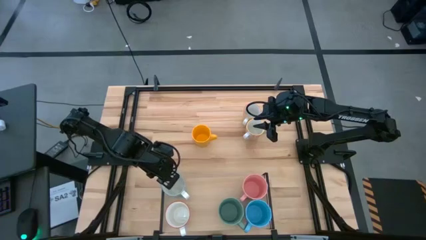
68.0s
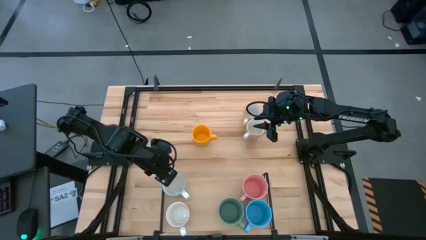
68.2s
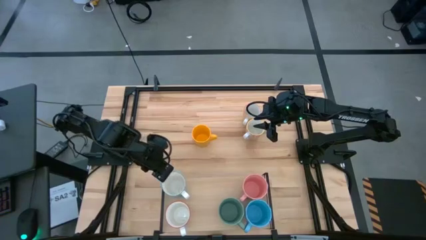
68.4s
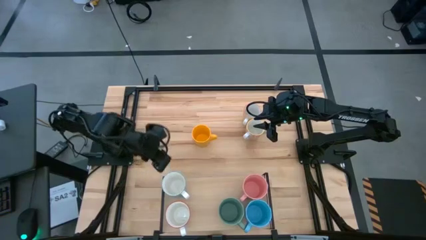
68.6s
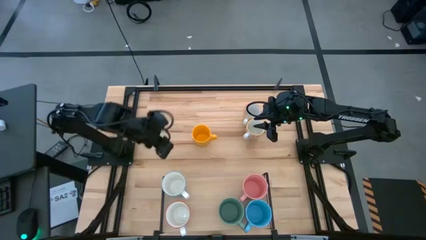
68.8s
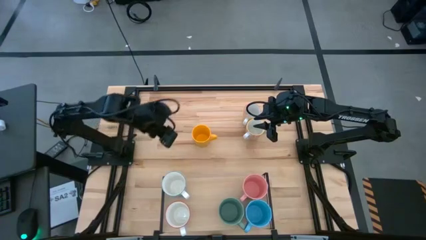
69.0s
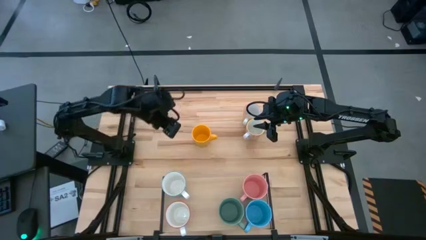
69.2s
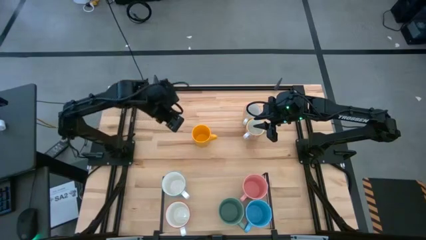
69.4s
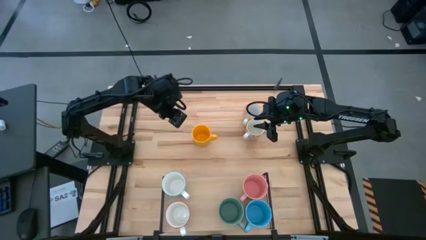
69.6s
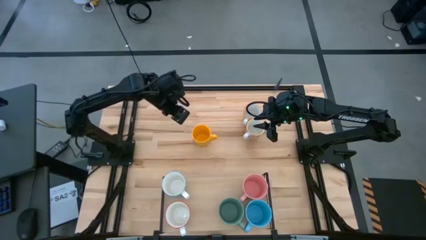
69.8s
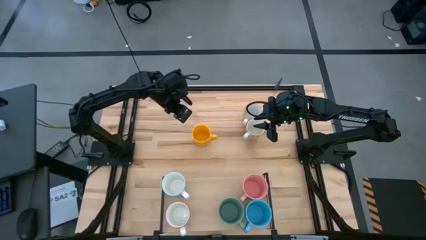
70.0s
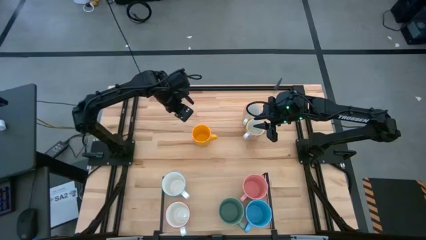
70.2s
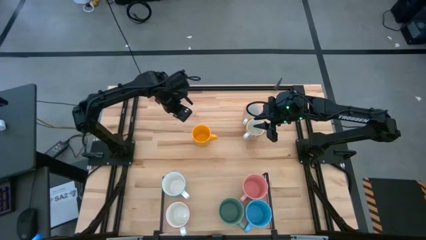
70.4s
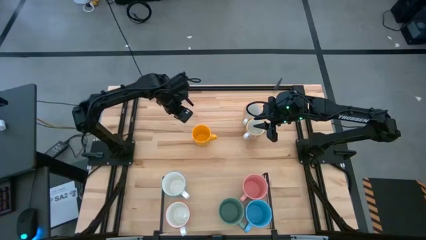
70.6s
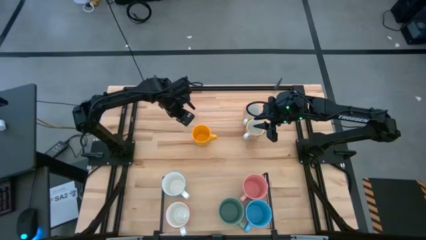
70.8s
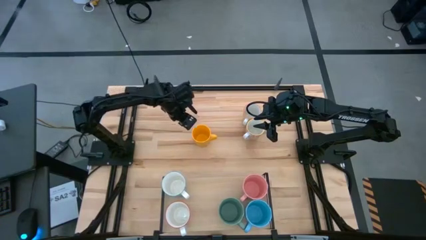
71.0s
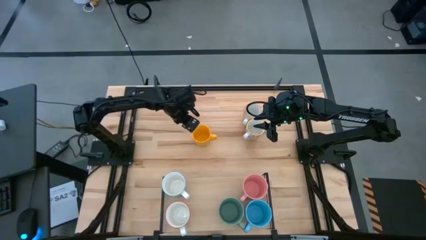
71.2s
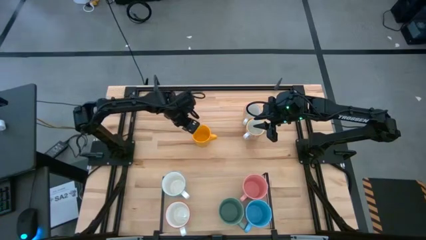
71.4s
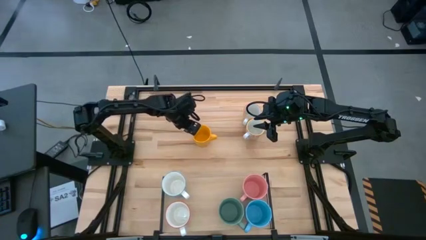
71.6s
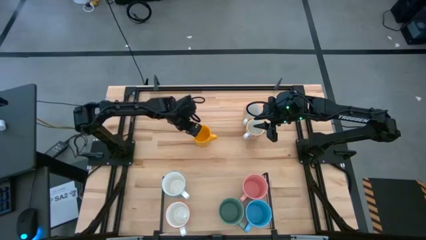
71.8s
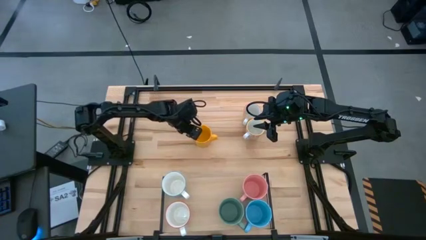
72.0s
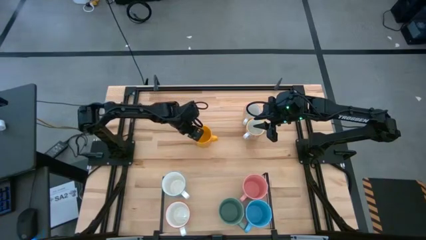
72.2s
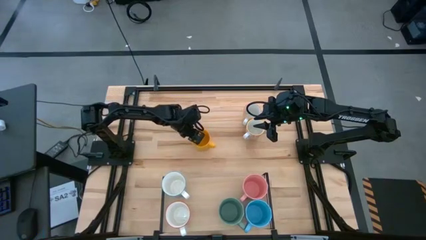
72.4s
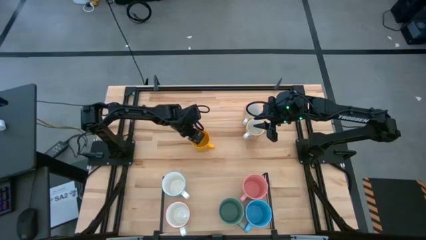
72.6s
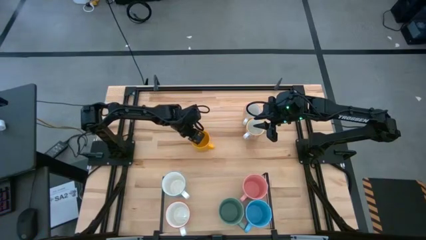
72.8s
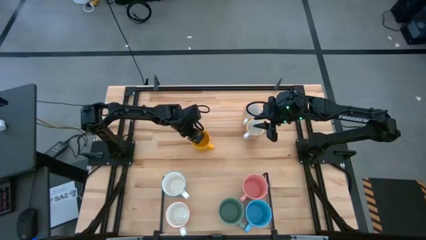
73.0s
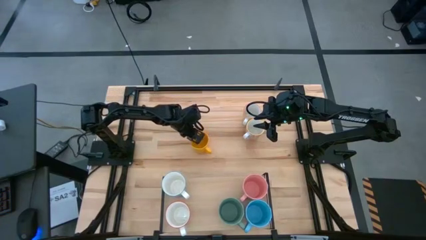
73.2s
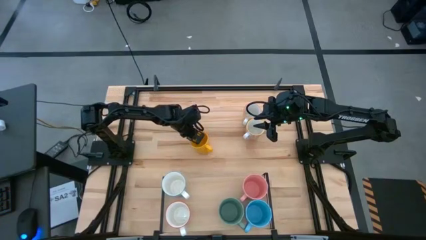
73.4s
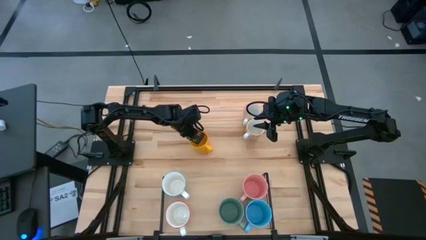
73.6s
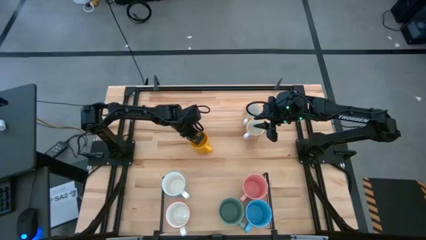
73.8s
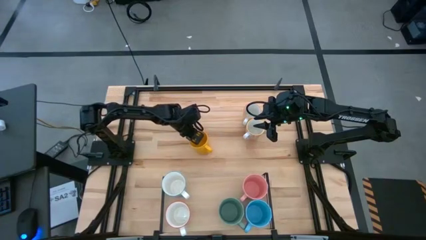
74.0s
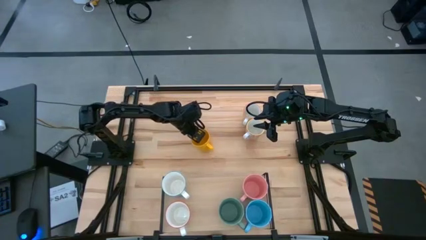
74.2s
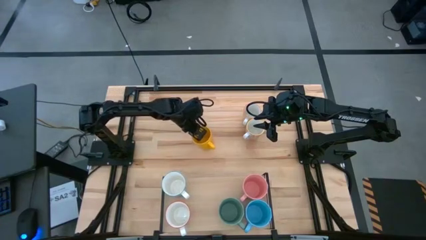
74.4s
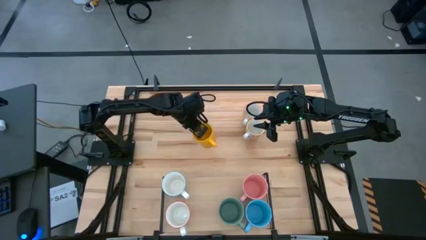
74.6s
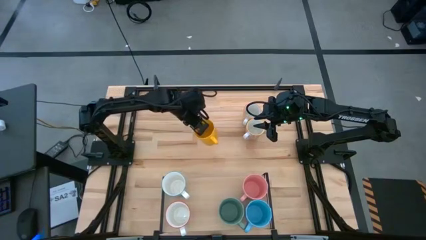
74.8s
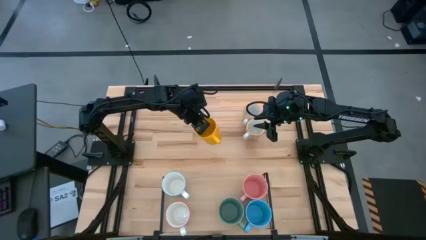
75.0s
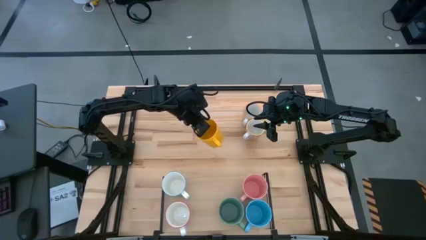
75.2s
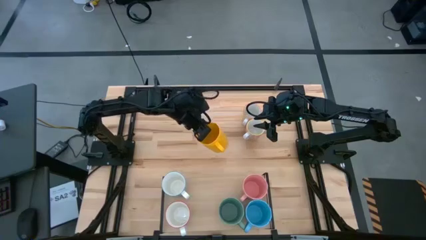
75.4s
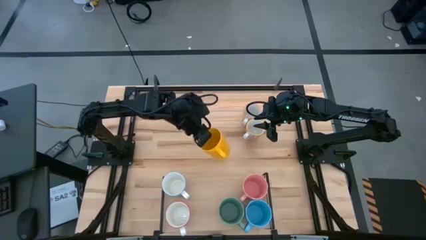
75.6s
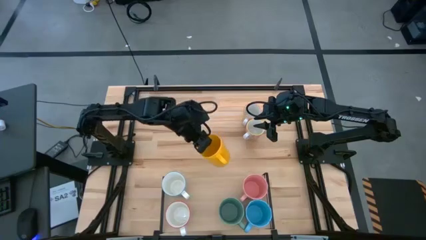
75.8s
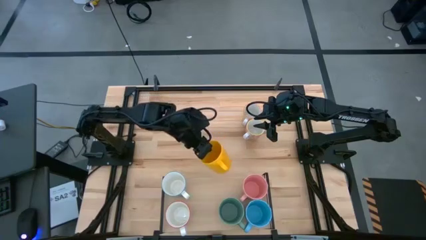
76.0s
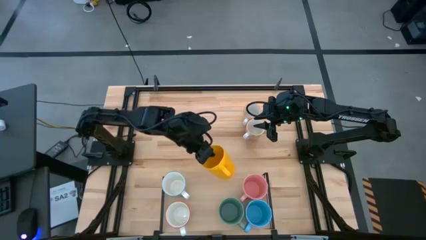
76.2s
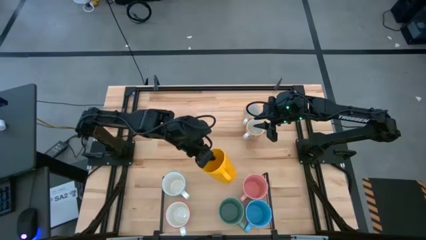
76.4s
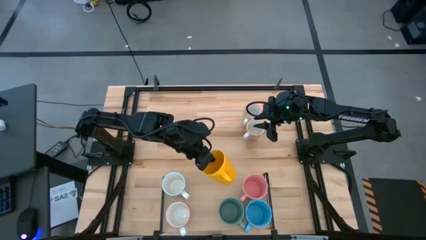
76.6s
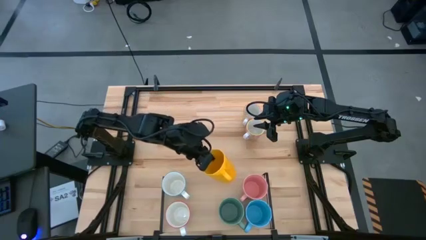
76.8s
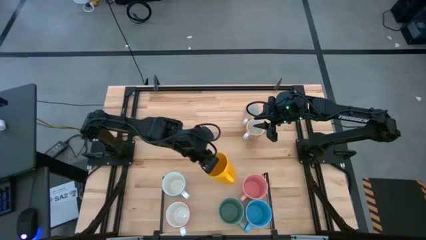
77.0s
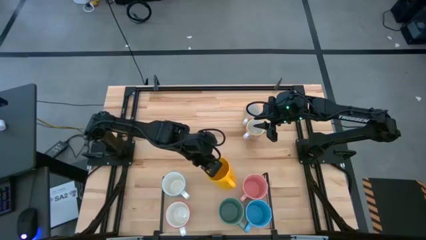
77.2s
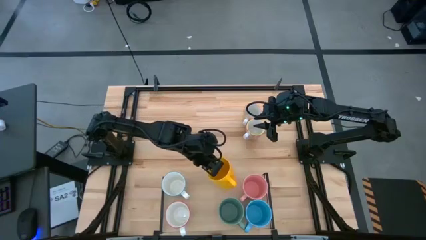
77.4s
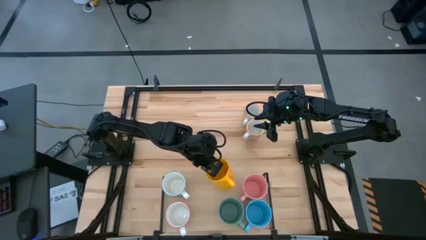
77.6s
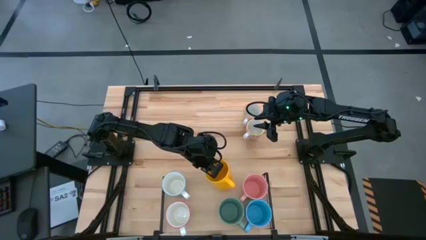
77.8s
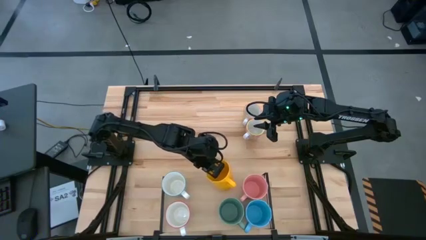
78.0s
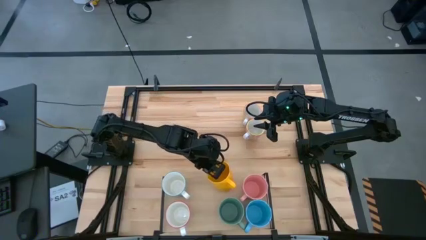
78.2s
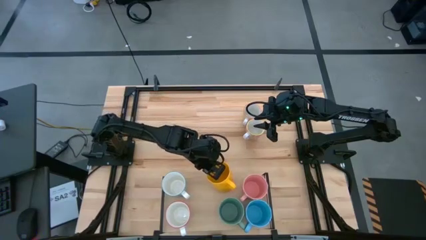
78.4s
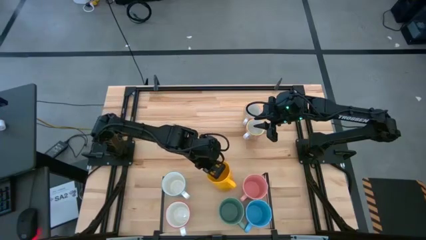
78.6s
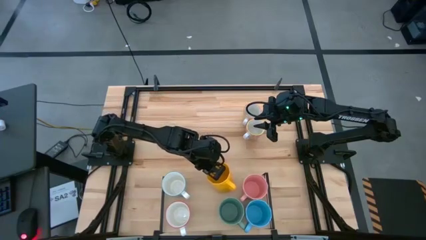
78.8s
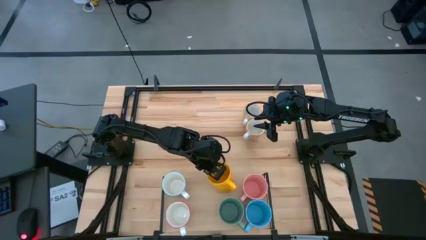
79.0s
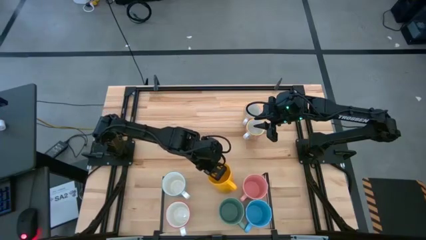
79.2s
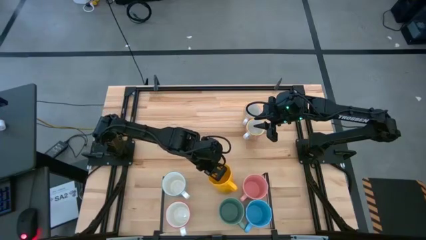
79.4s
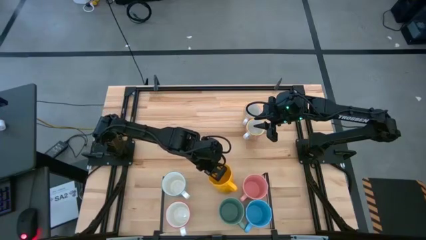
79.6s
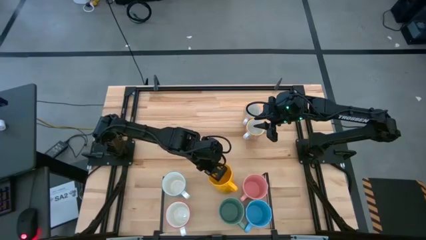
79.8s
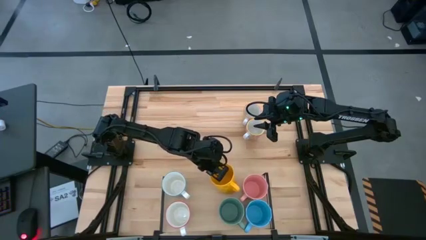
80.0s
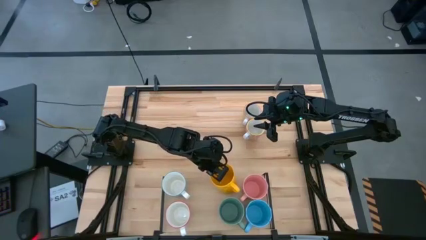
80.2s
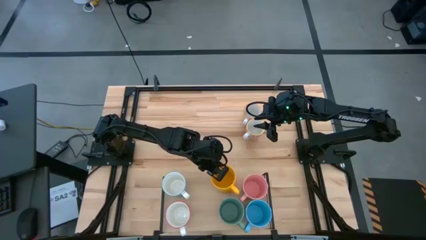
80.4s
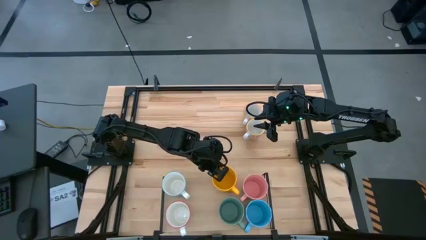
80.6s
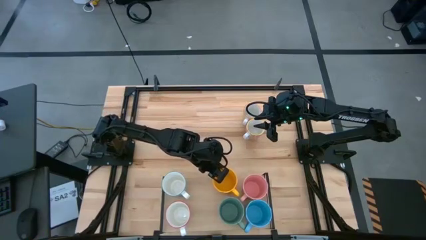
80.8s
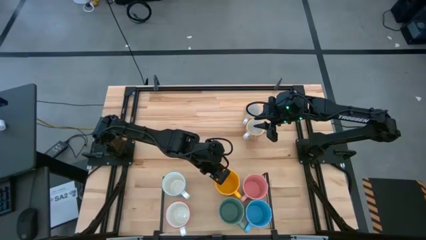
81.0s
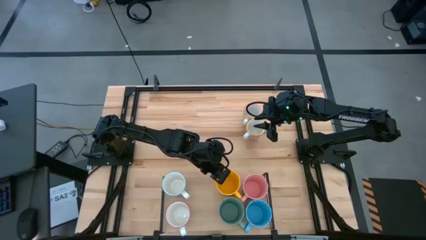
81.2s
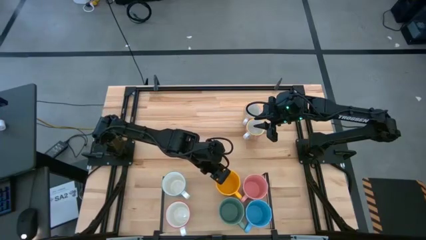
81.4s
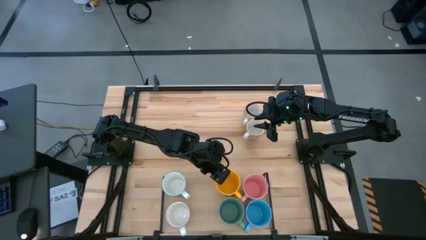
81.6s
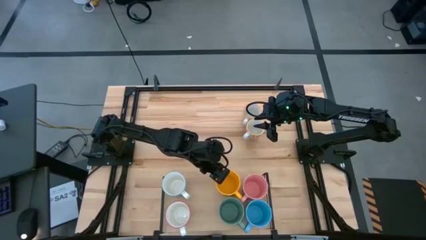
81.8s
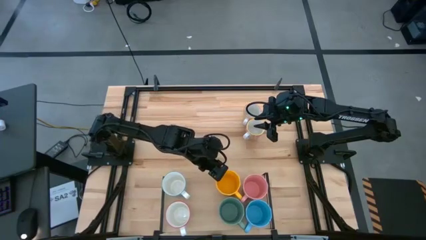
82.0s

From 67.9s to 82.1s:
Task: Place coffee mugs
Put the yellow mug on the shelf

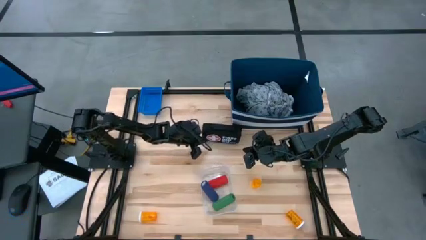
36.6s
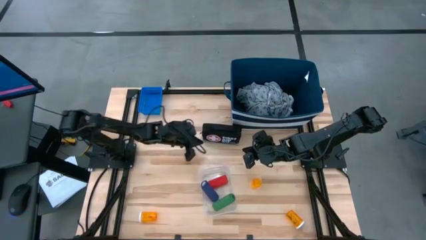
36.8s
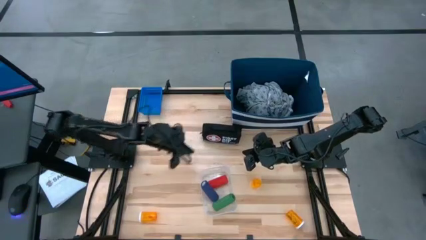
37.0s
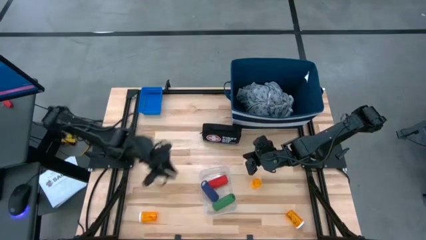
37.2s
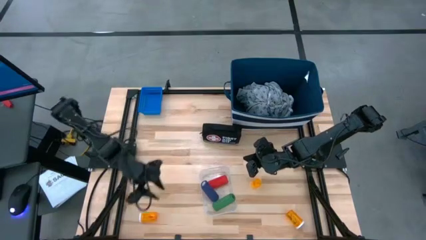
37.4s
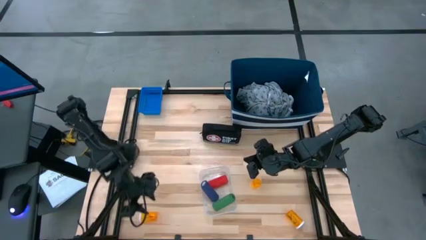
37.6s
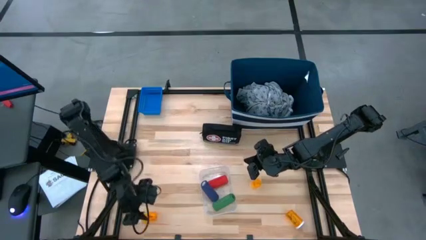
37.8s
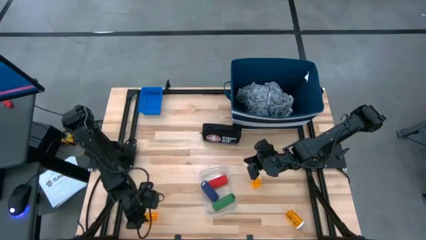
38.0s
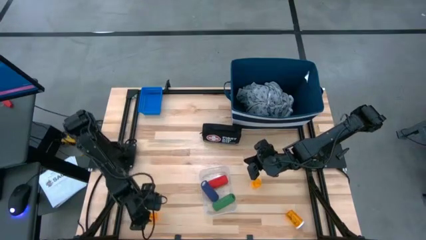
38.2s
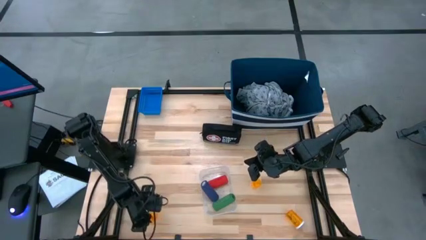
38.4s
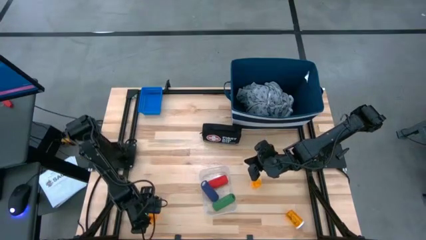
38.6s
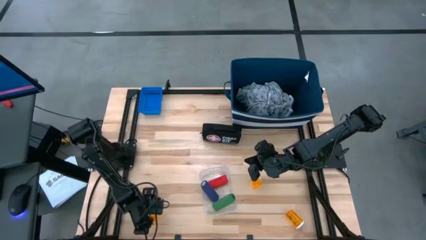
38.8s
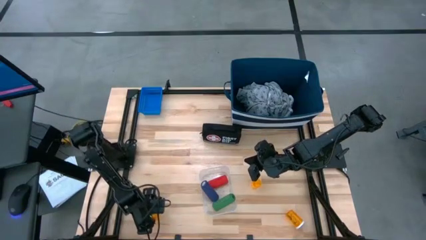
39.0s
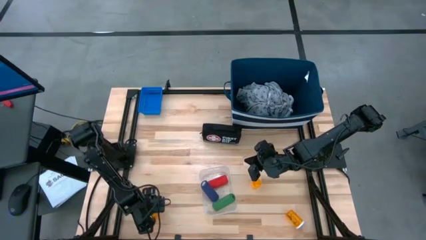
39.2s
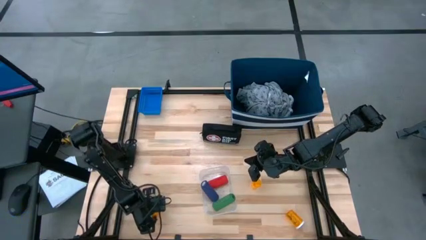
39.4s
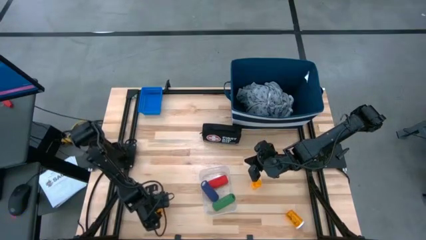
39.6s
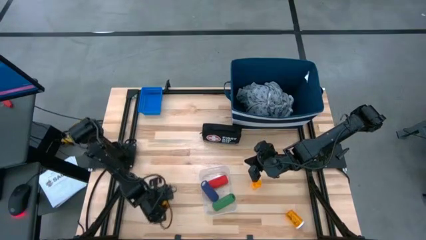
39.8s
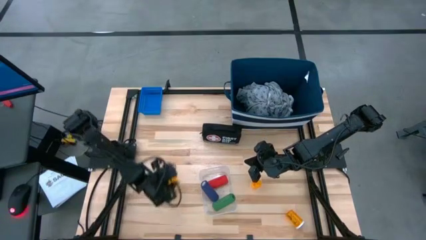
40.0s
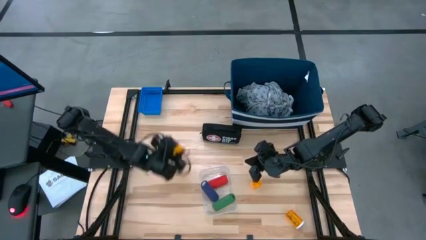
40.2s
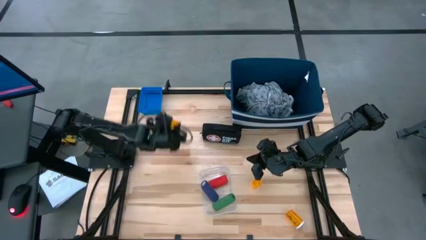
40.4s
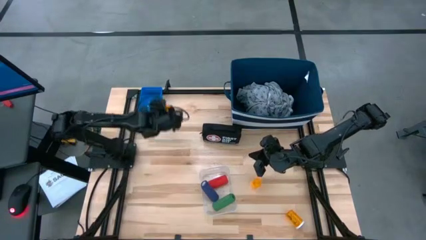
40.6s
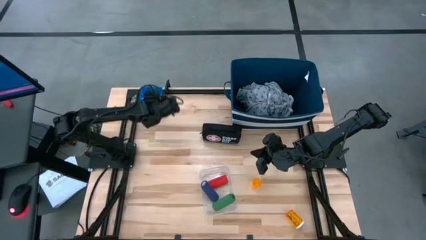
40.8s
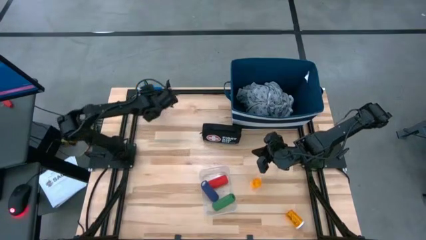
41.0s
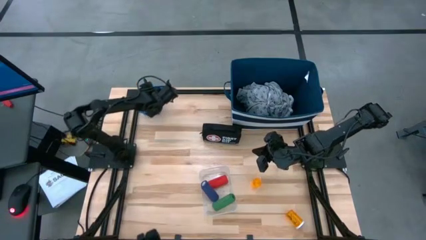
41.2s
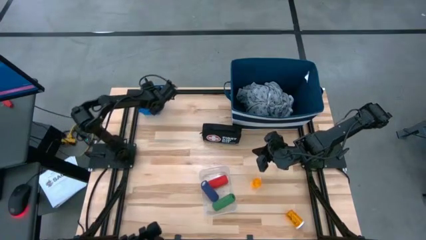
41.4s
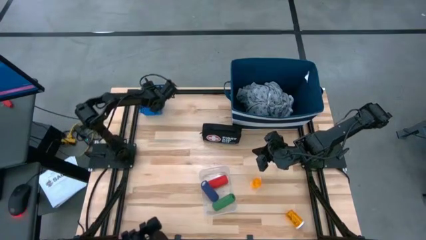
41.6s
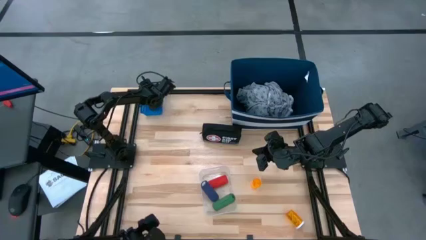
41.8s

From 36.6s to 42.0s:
Task: Pick & place medical supplies in basket/bin
Put the bottom left orange pill bottle into the blue bin
